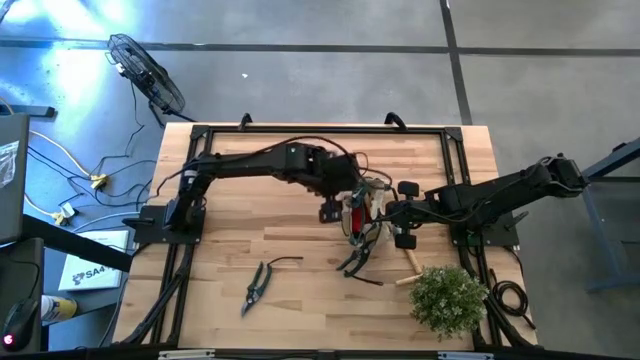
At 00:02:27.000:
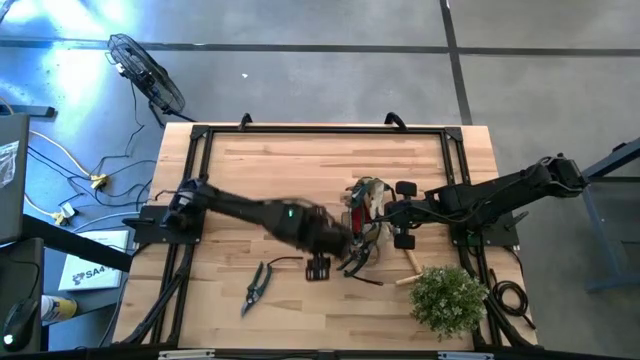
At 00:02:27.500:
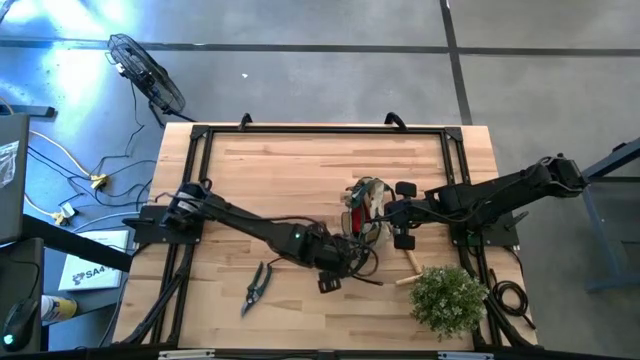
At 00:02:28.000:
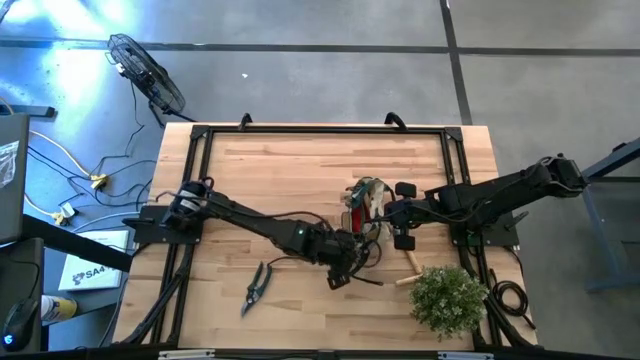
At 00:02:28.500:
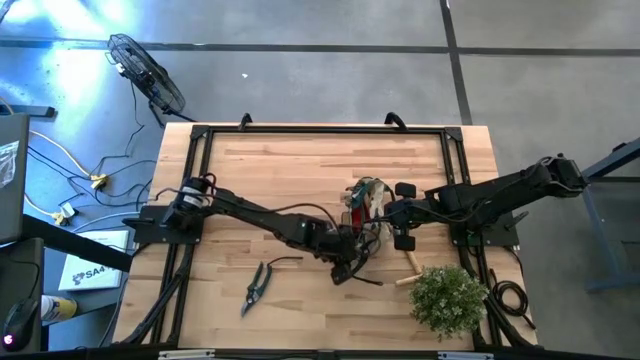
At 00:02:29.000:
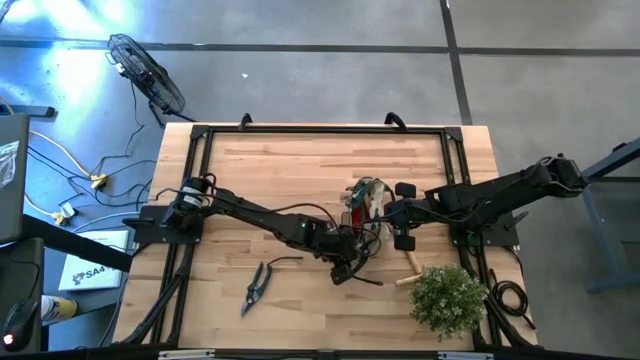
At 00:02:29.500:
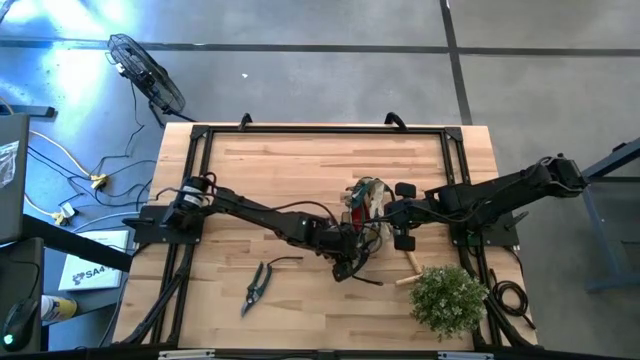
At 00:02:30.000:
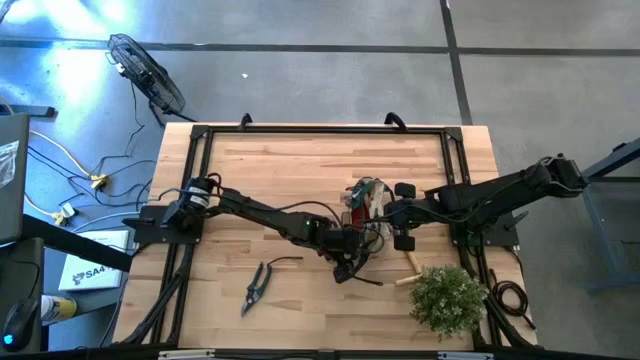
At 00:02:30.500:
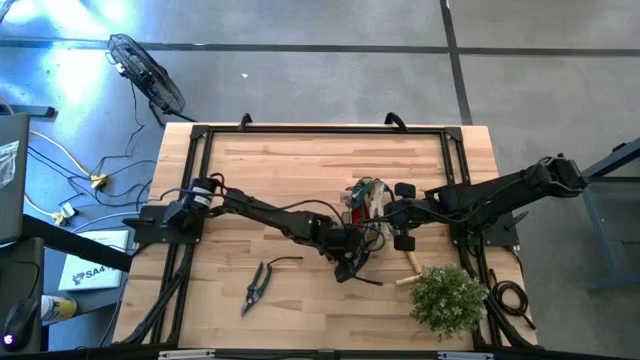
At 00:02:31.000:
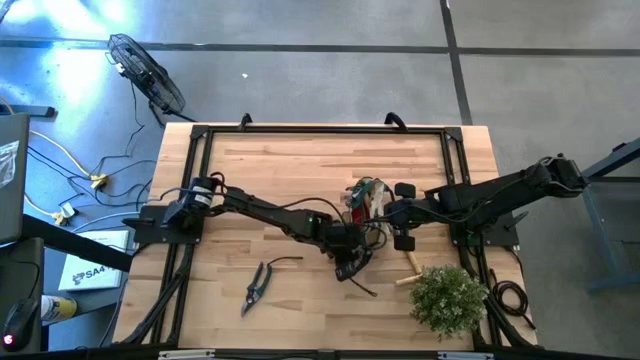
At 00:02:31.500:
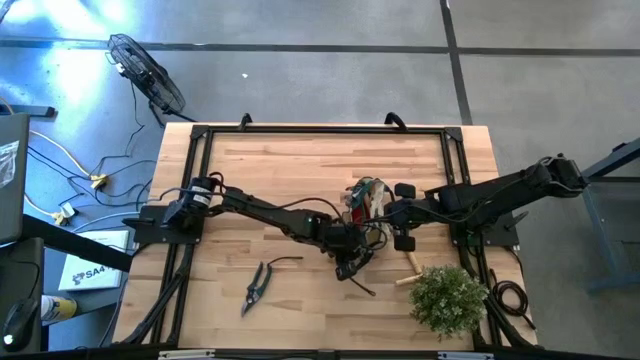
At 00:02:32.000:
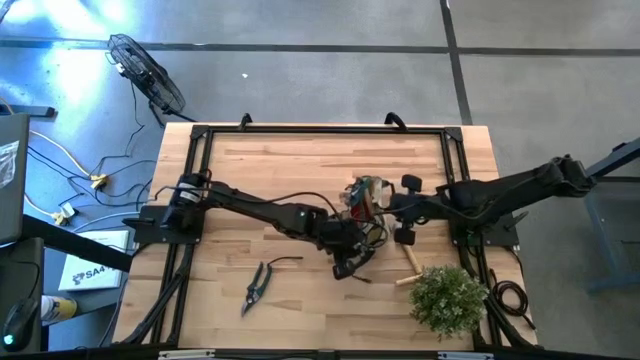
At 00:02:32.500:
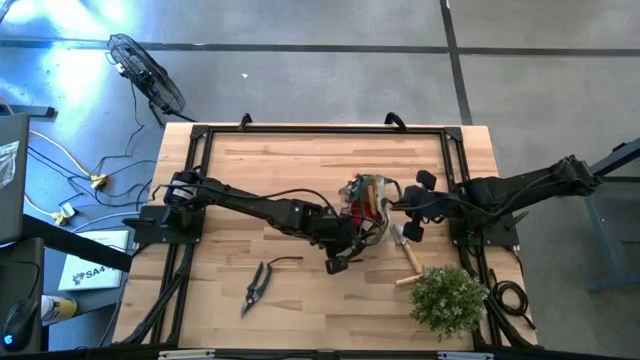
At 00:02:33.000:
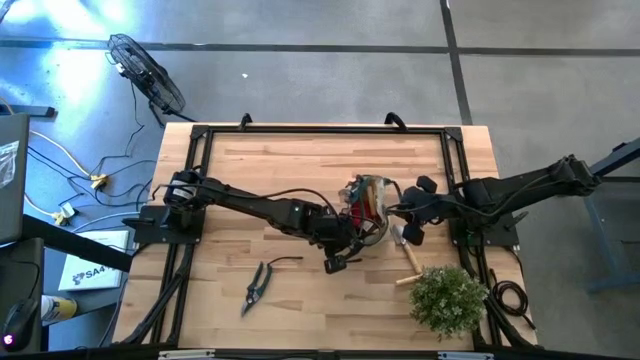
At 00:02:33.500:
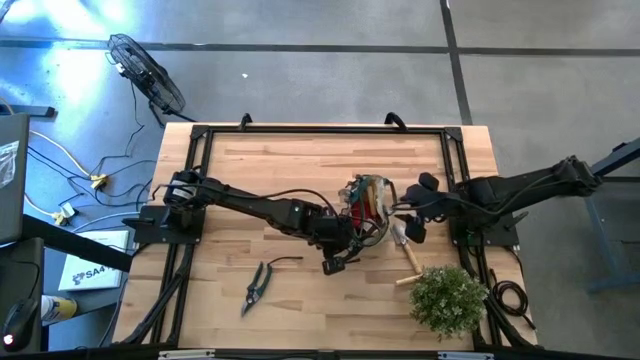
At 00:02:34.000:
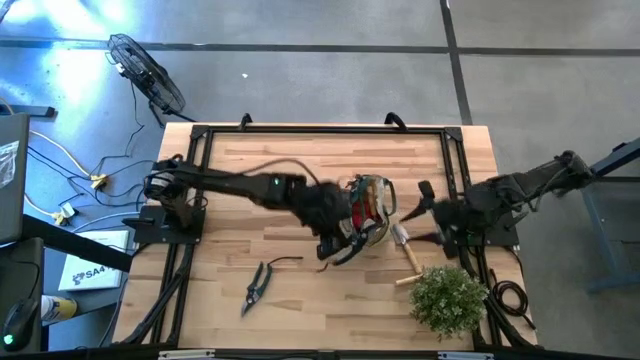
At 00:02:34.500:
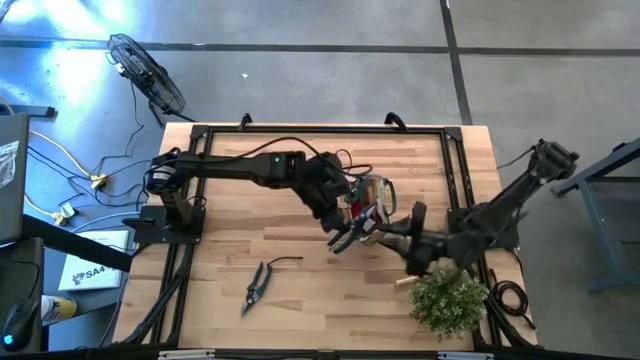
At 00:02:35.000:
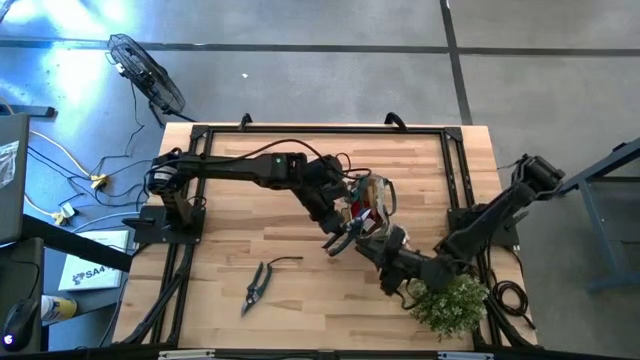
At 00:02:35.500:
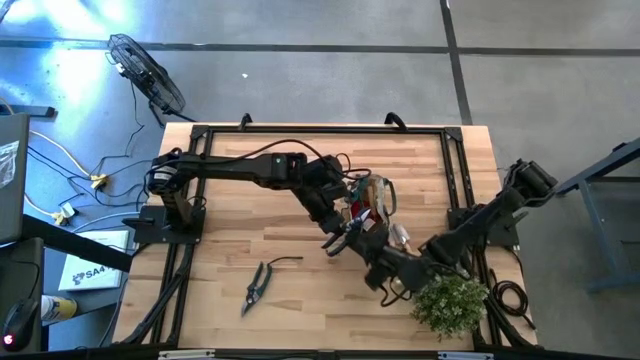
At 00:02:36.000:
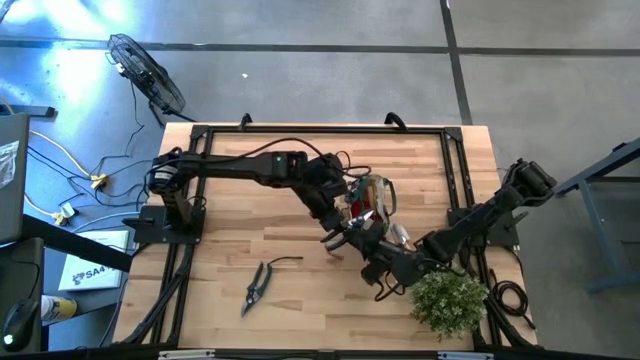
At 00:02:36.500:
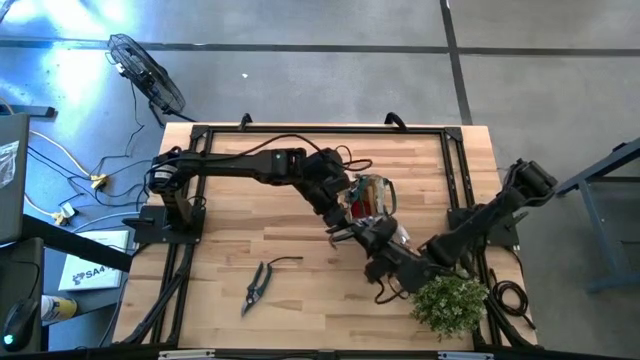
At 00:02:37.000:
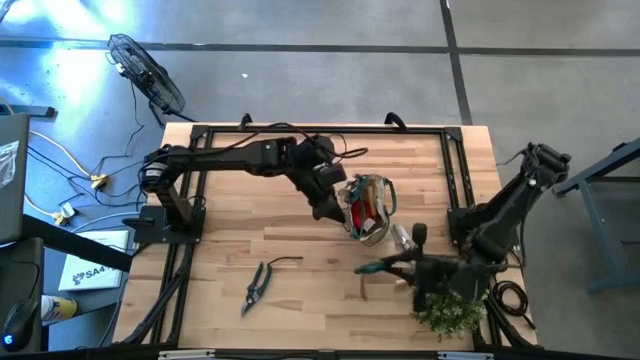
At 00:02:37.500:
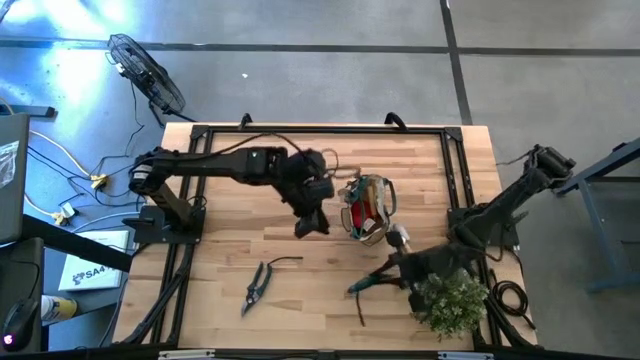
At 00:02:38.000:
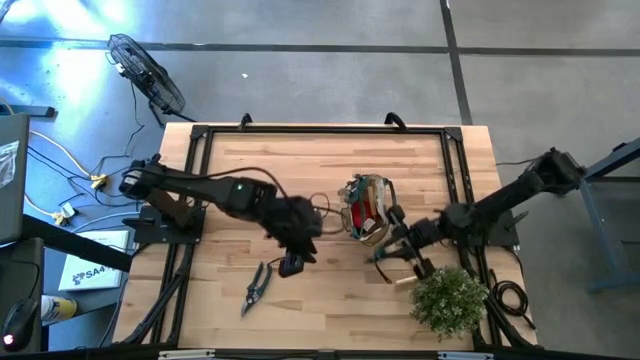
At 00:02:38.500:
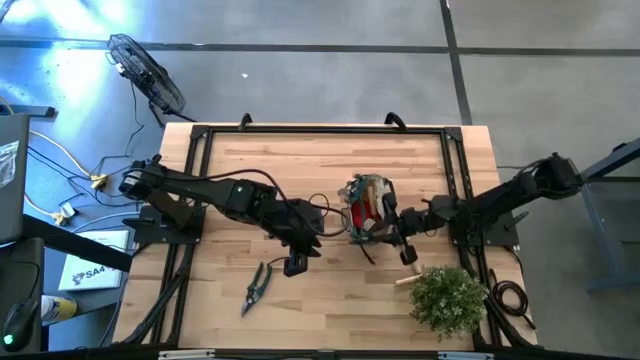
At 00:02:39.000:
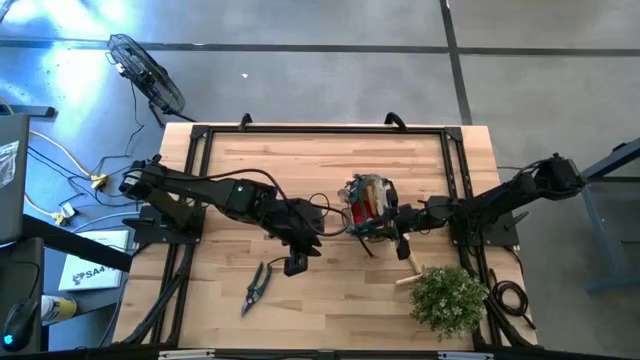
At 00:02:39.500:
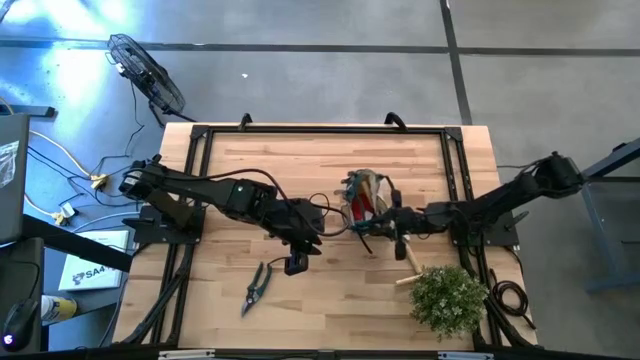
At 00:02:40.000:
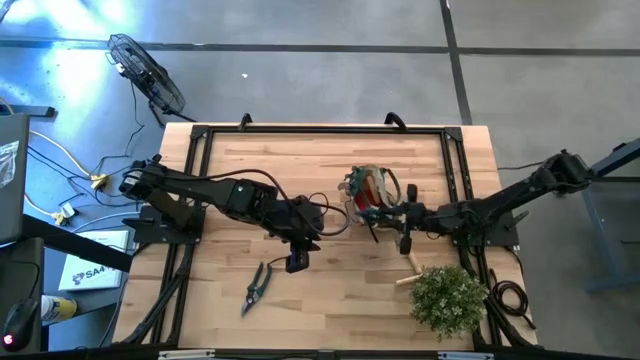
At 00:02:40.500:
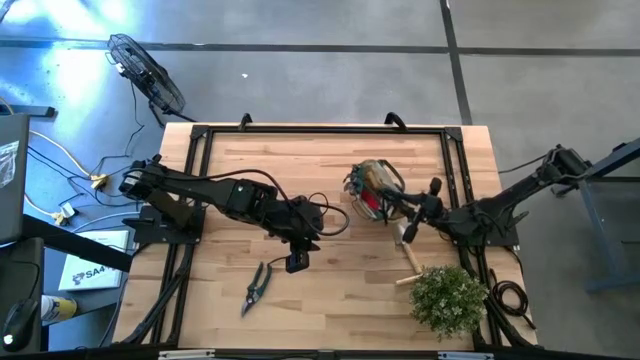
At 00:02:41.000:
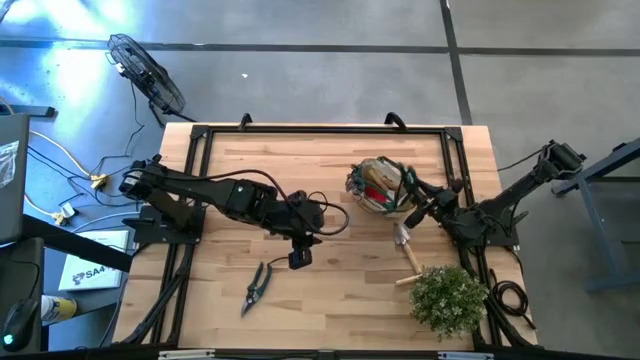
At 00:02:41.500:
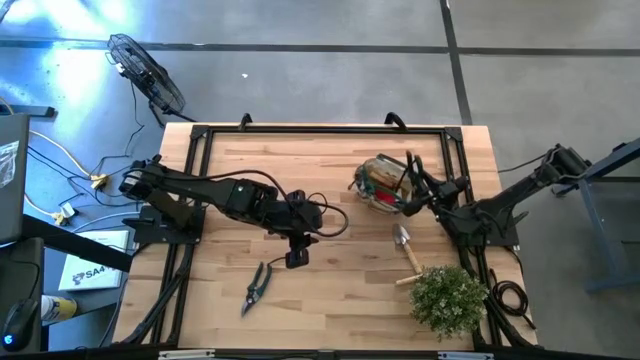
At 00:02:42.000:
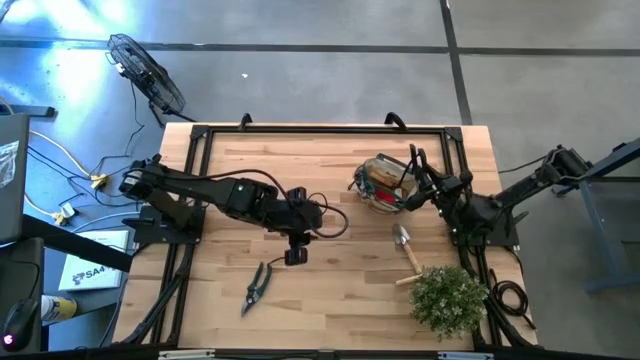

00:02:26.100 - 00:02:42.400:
Task: Pick & Place Garden tools in Gardening bag
Put the top green shear scissors into the light brown gardening bag

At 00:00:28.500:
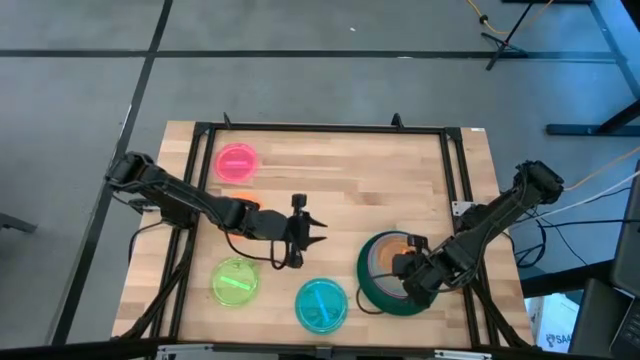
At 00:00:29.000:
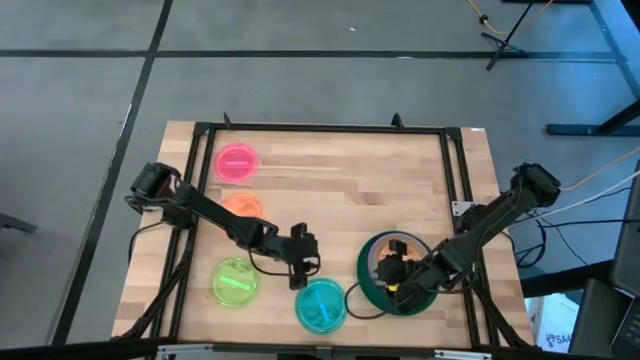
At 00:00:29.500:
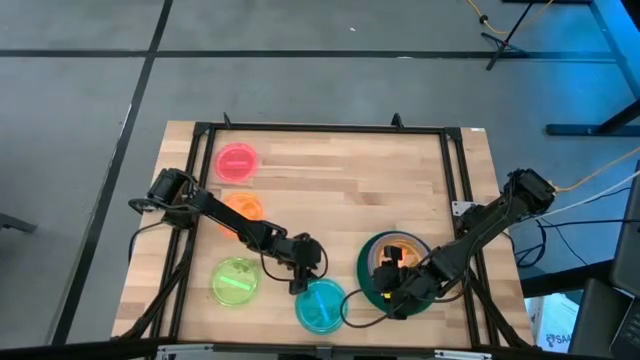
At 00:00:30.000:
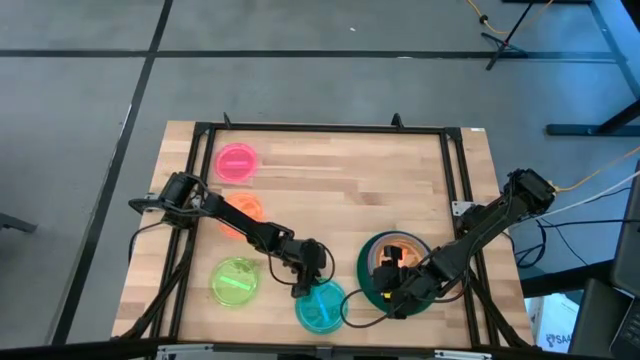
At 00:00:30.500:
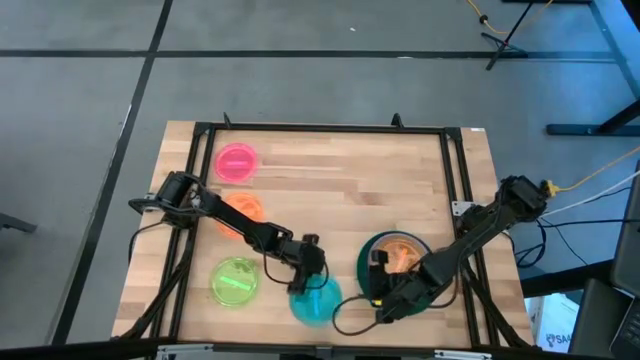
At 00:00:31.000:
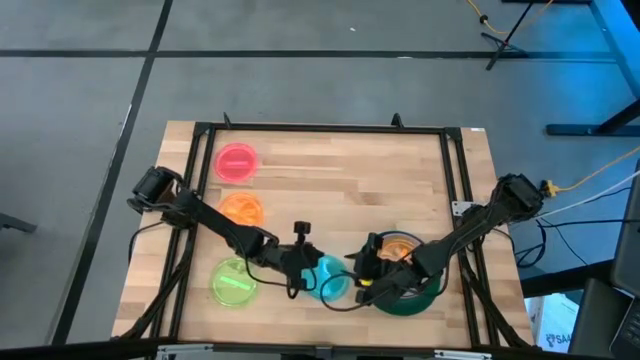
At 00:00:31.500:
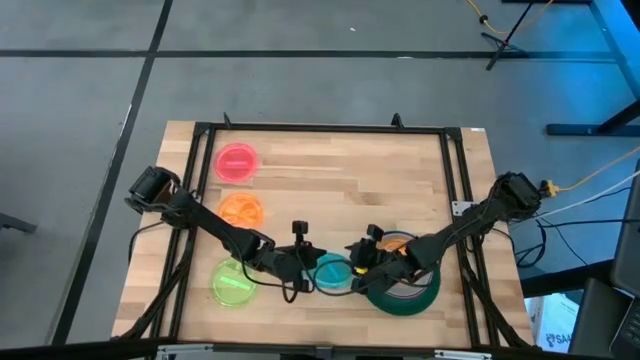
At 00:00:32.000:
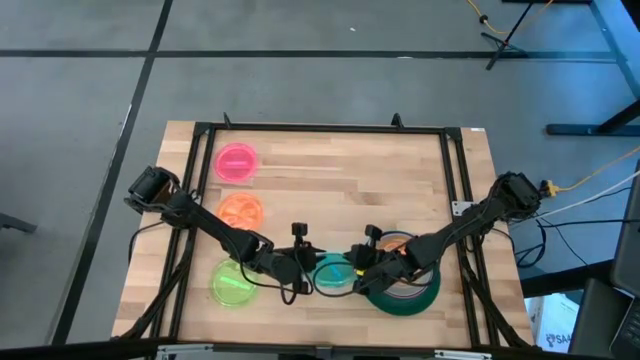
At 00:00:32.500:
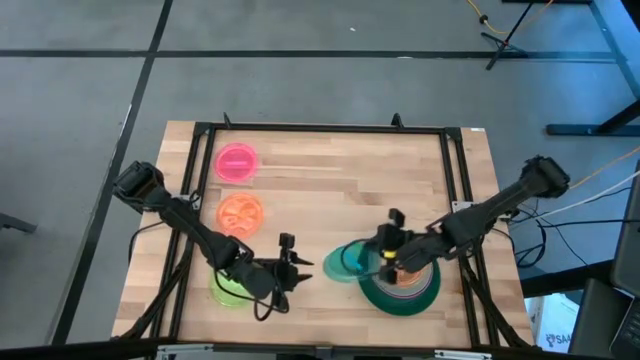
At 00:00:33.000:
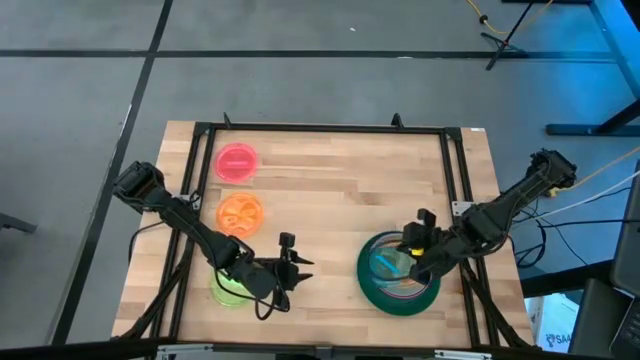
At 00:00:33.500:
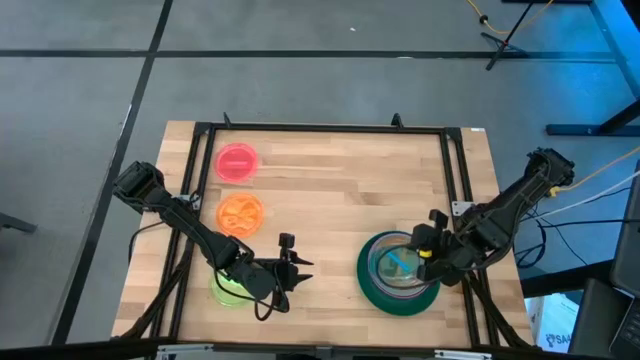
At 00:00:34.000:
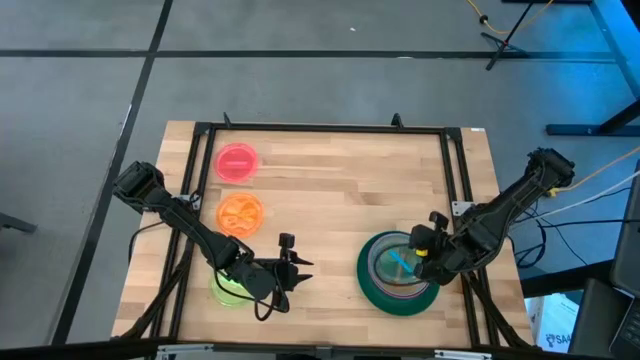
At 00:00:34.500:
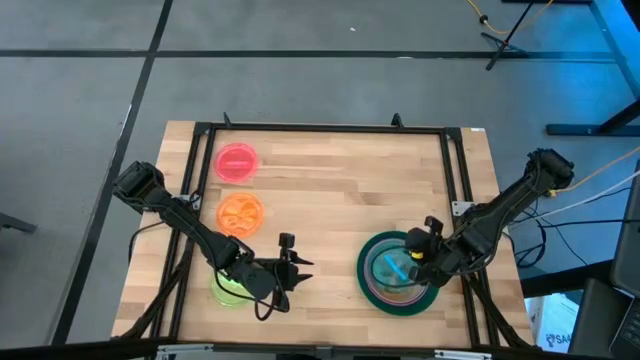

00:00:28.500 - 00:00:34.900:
Task: Stack plastic plates
Stack the blue plate on the orange plate
